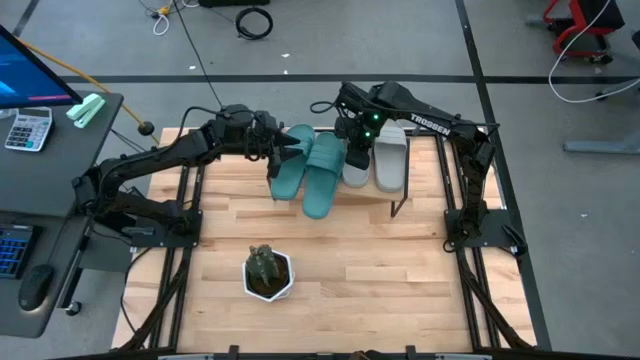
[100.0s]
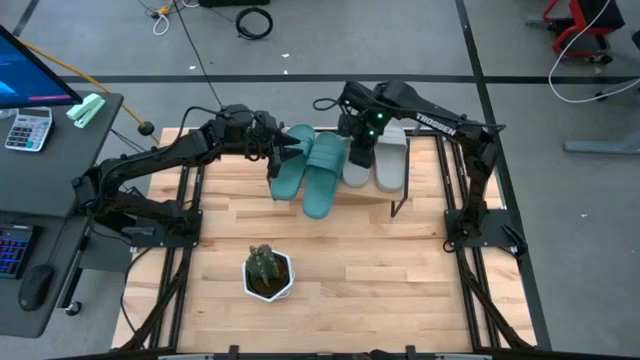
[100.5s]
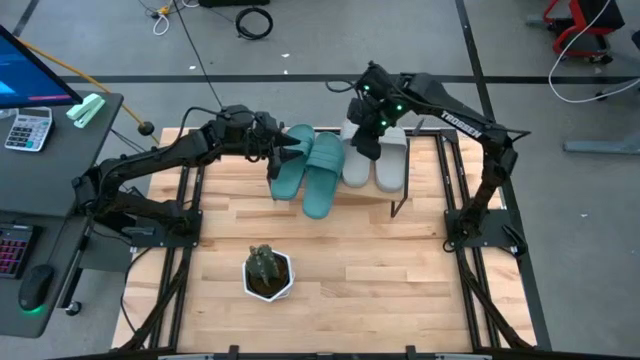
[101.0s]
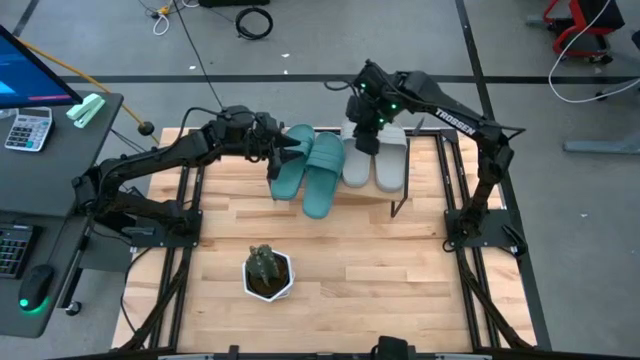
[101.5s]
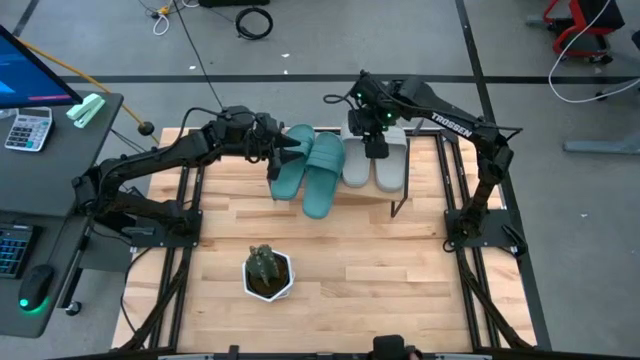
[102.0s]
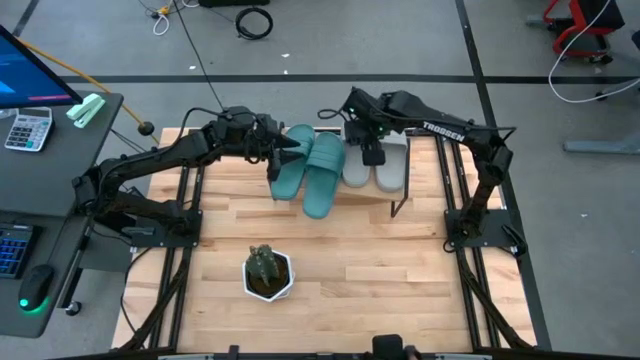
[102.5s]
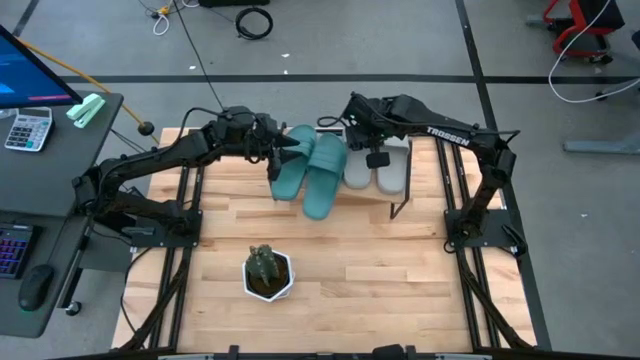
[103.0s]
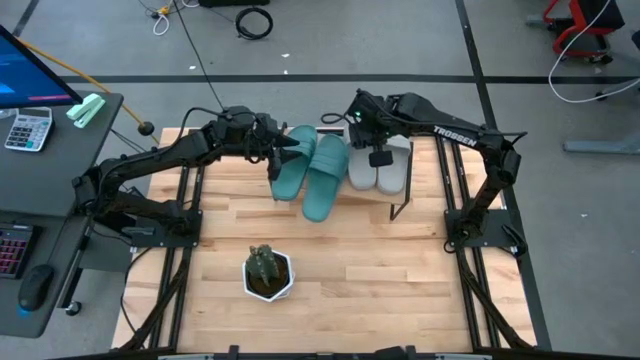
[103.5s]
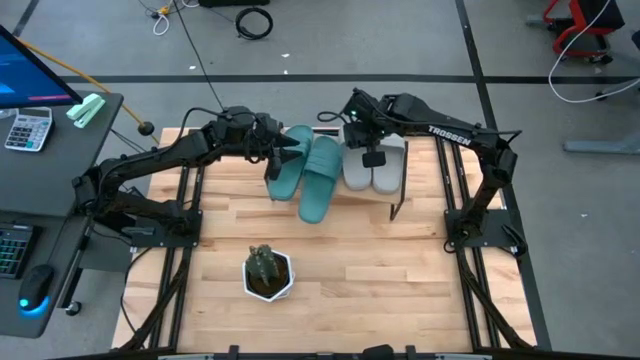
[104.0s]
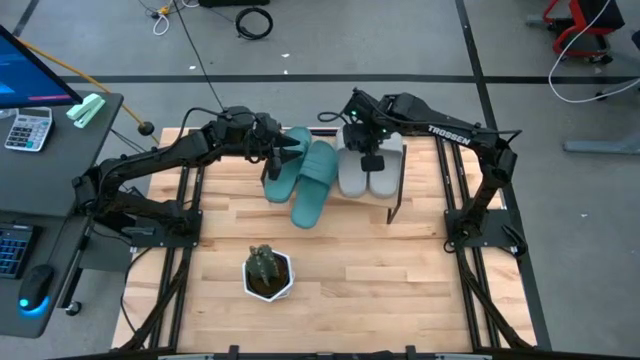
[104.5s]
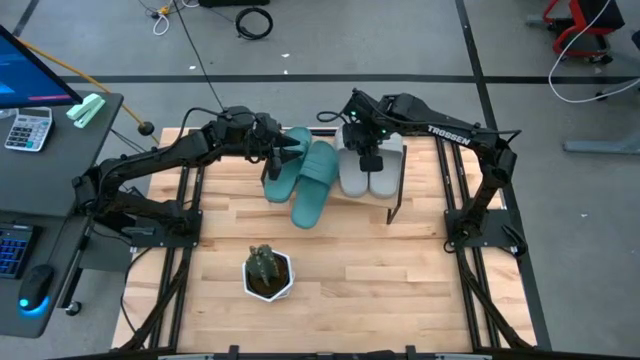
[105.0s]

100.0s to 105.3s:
Task: Pick and place slides into the shelf
Adjust the gray slide on the shelf

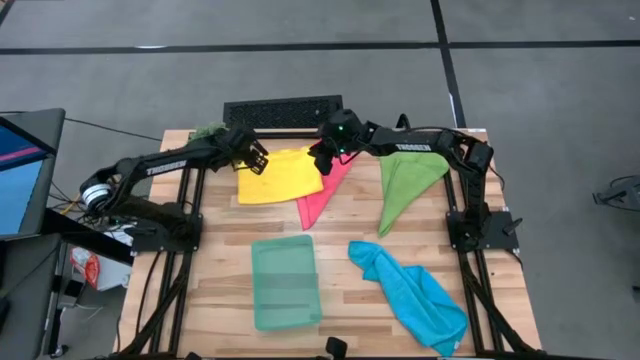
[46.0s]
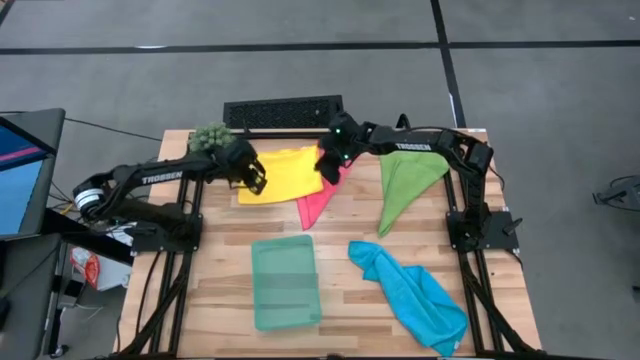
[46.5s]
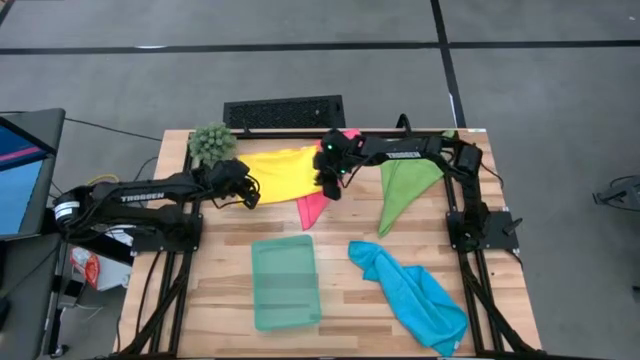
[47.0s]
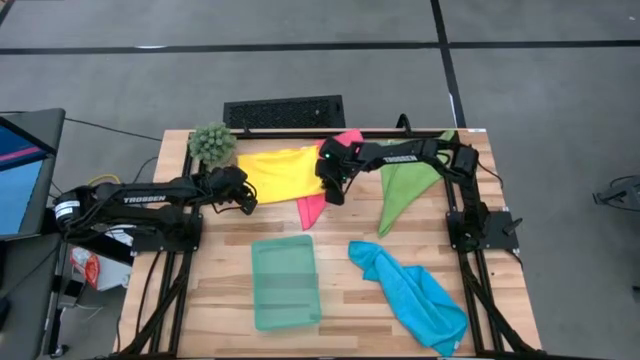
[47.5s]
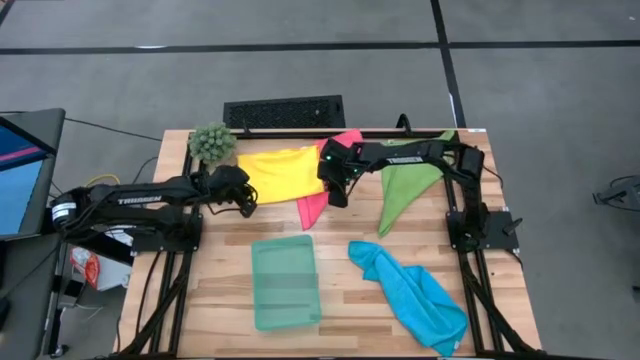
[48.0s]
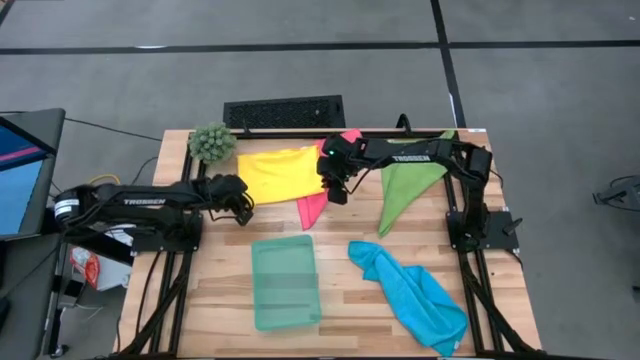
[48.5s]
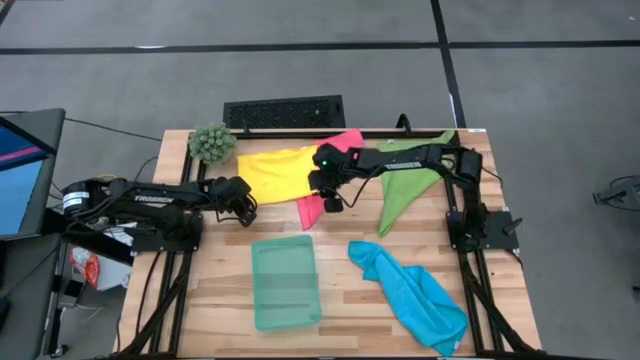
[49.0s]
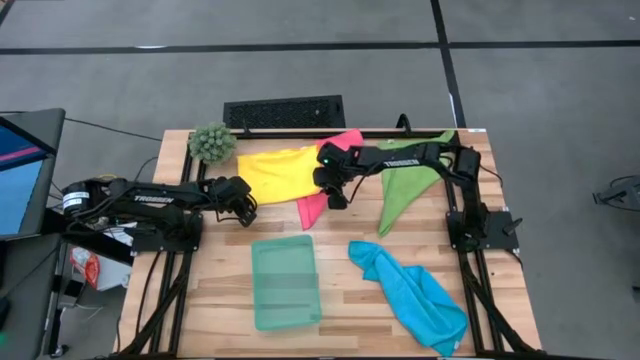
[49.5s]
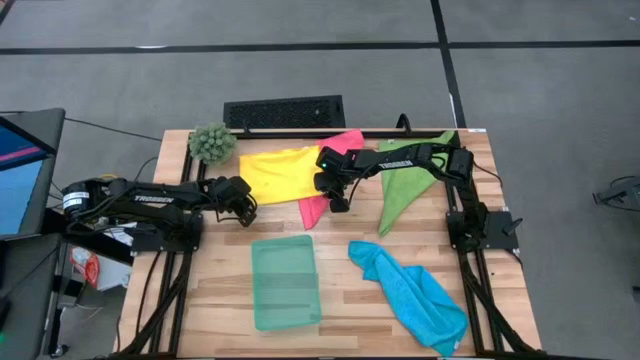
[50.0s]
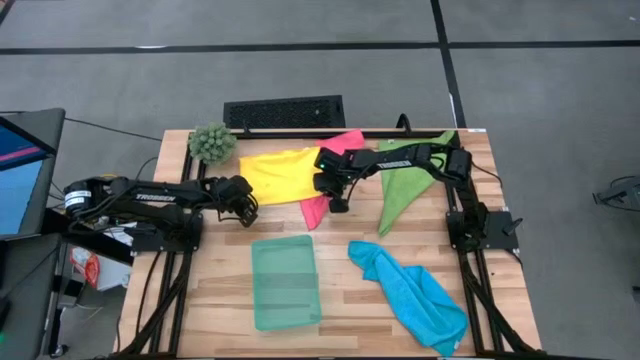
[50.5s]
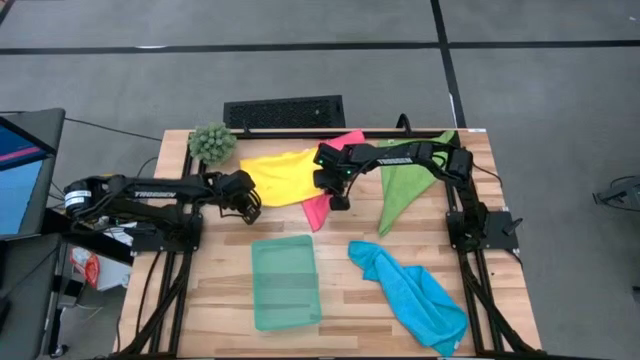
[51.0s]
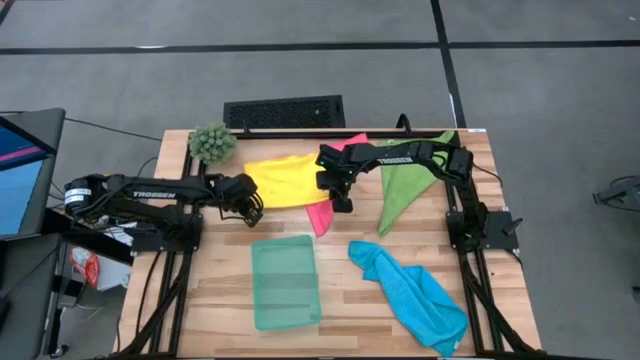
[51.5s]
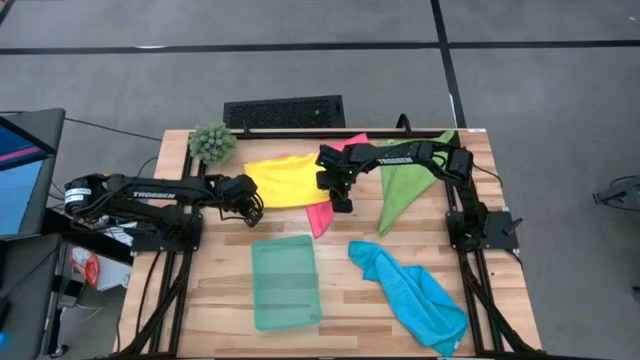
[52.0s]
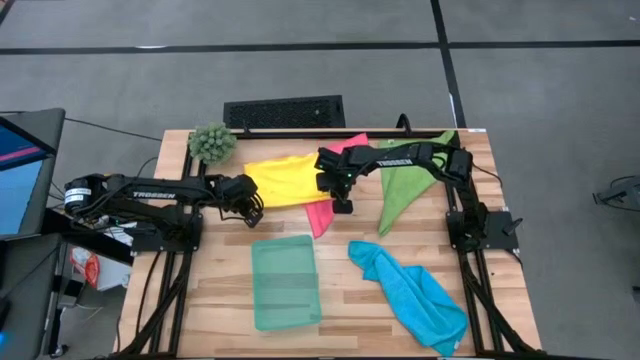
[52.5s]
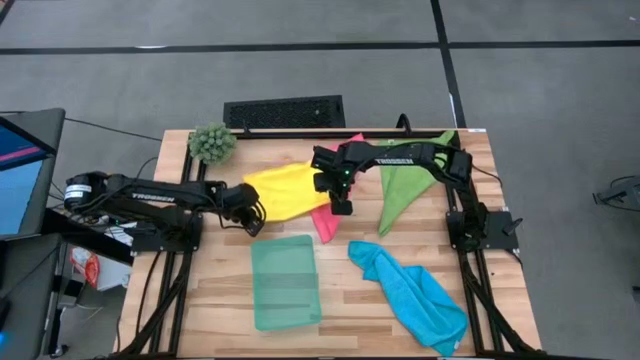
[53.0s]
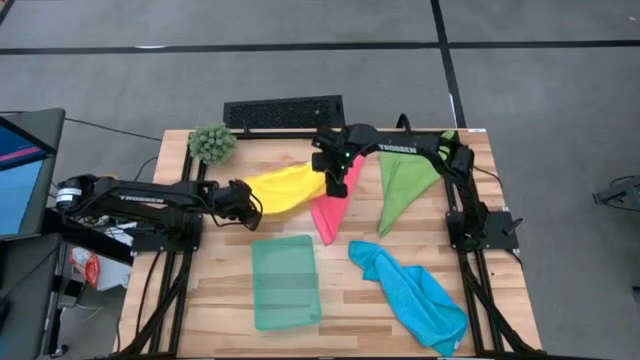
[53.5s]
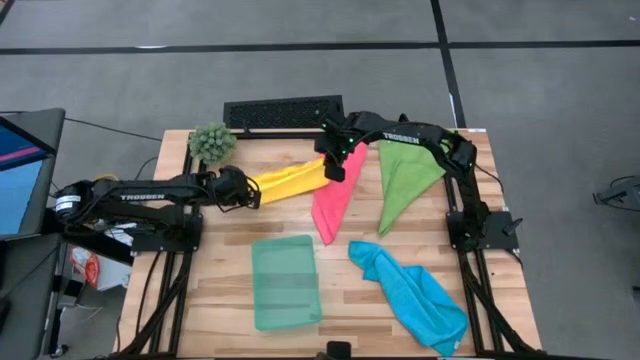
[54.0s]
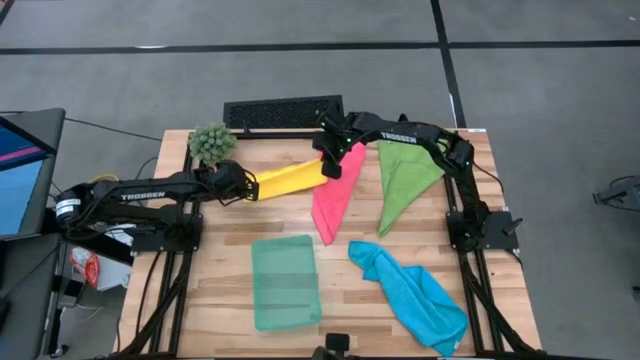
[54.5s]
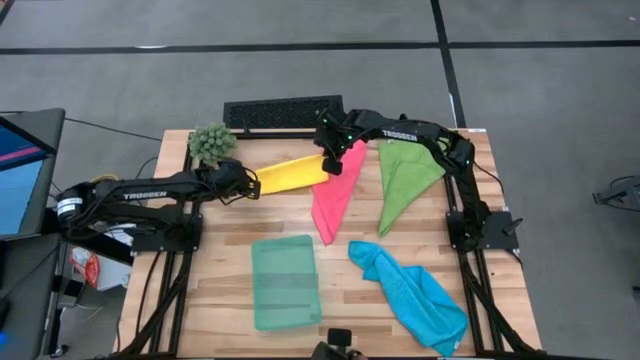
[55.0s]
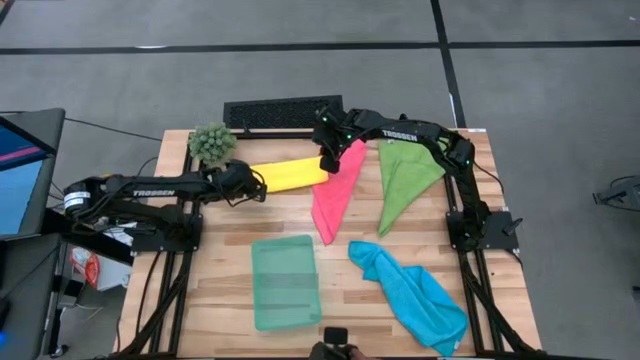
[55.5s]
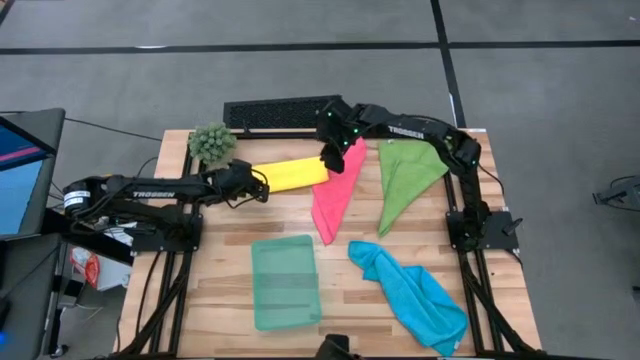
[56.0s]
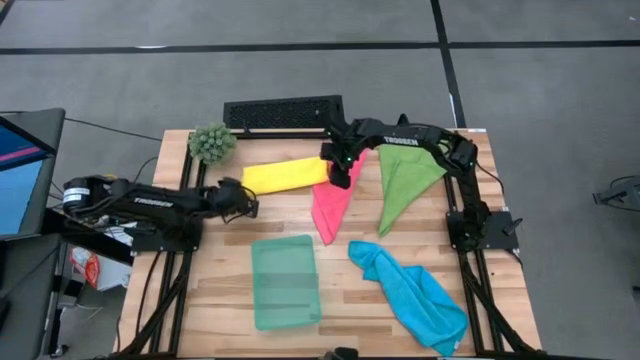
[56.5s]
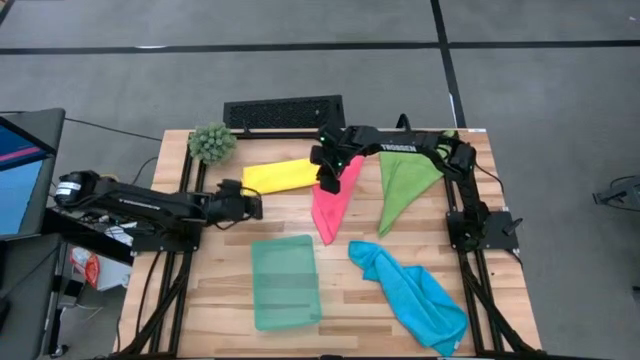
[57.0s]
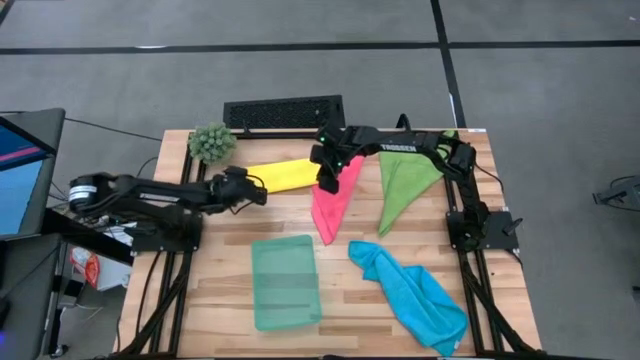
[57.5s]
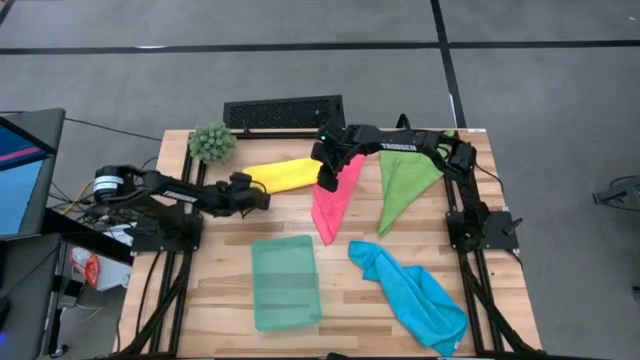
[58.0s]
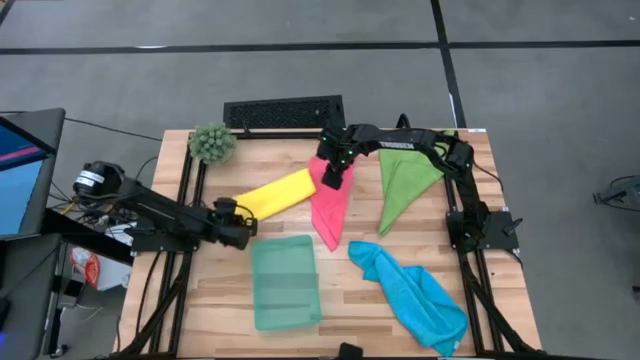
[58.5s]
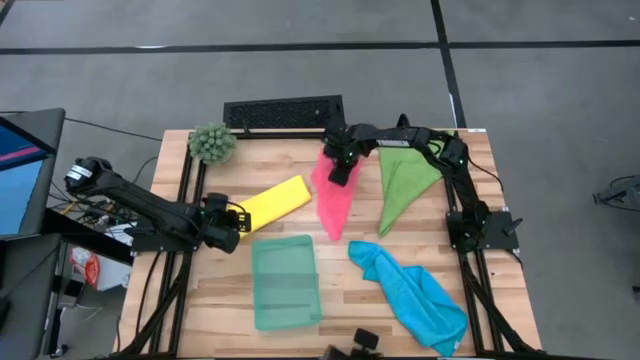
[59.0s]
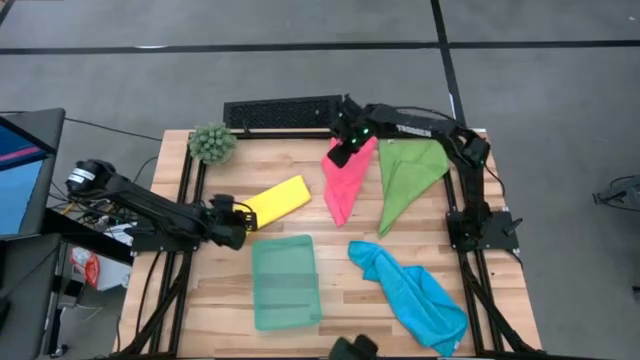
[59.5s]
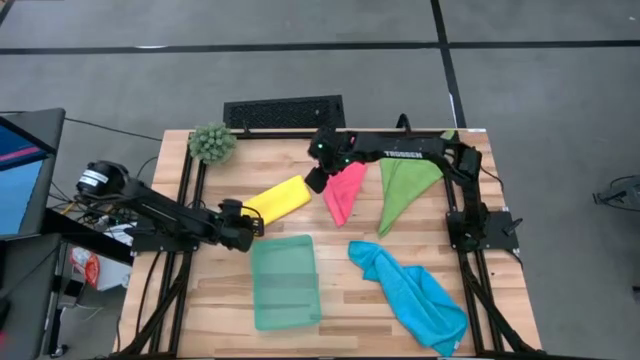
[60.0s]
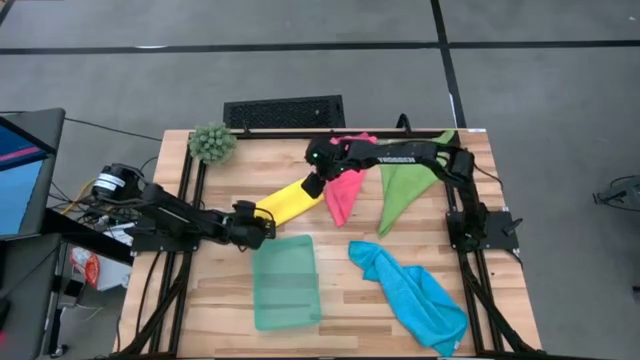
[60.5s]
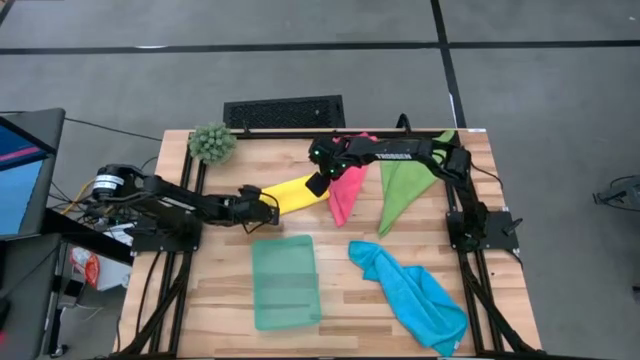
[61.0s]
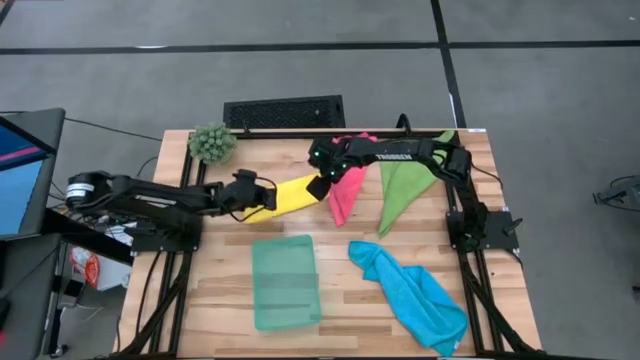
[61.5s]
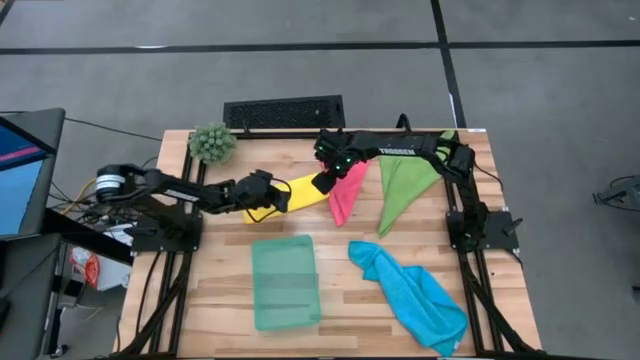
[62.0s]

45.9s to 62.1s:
Task: Fold microfiber towels
Fold the yellow towel
